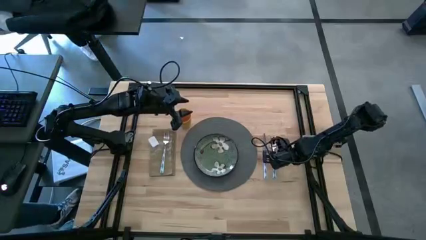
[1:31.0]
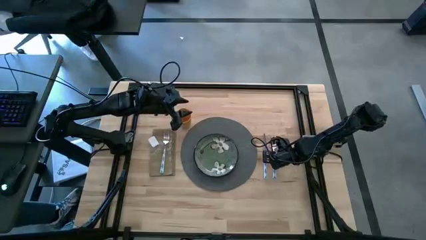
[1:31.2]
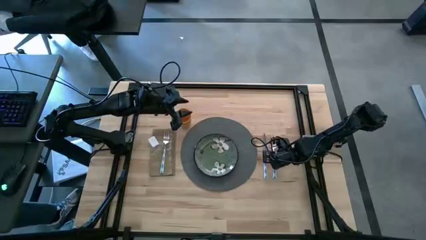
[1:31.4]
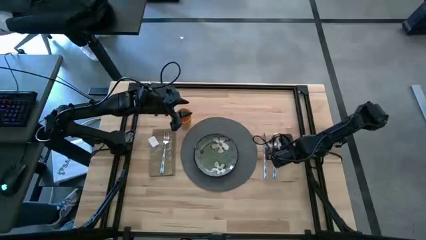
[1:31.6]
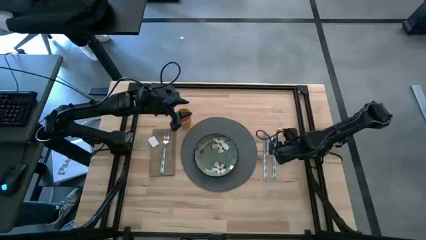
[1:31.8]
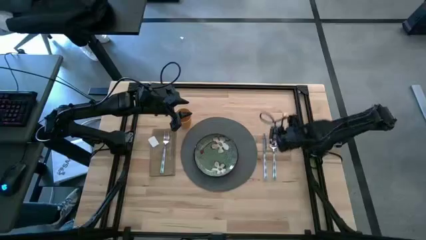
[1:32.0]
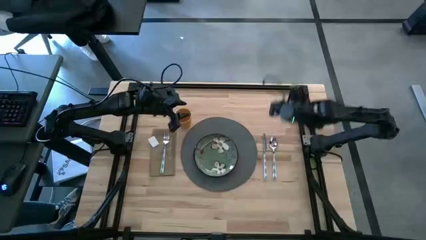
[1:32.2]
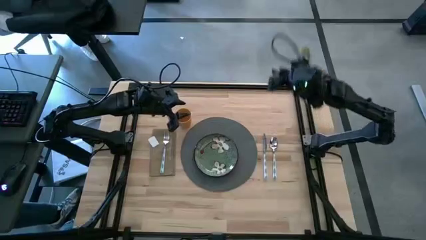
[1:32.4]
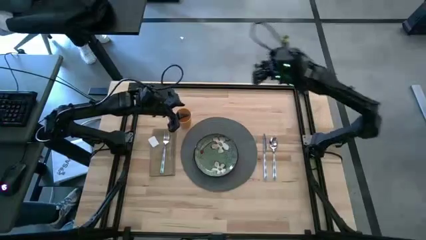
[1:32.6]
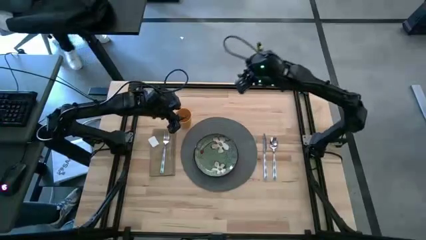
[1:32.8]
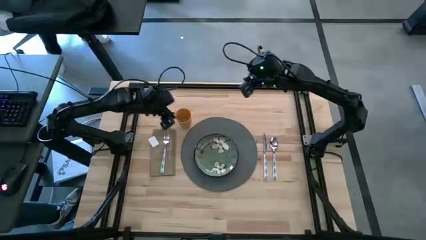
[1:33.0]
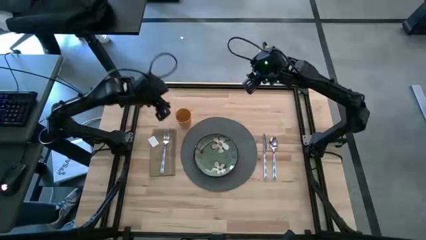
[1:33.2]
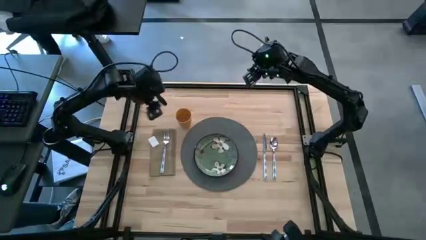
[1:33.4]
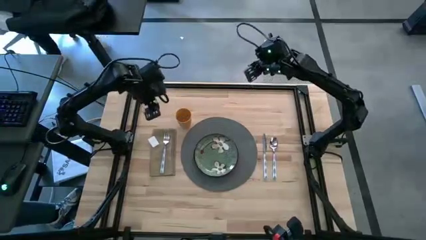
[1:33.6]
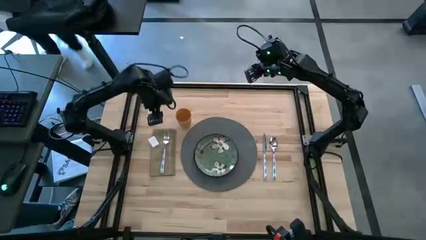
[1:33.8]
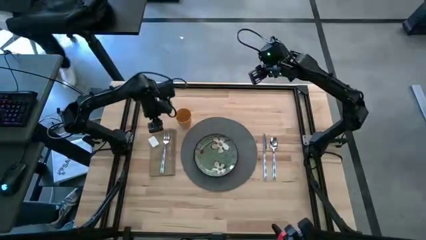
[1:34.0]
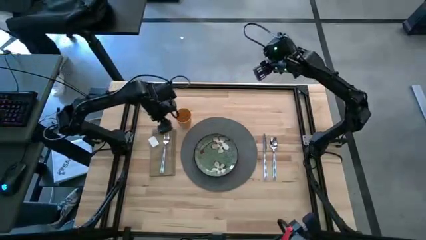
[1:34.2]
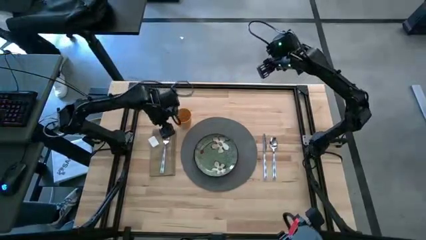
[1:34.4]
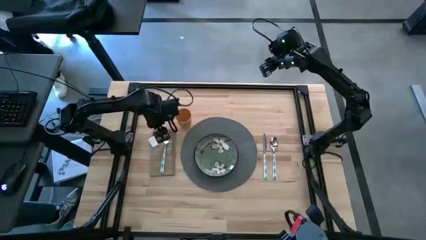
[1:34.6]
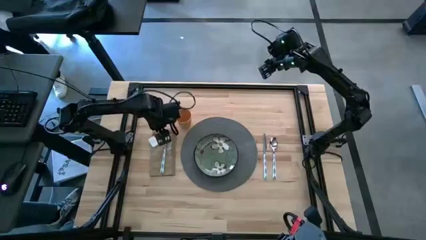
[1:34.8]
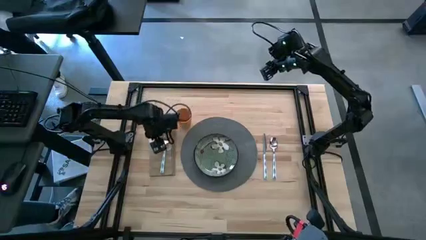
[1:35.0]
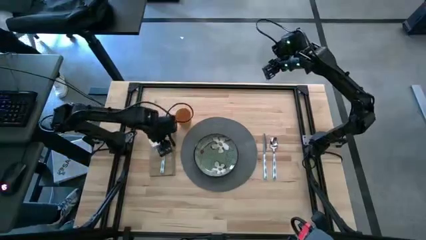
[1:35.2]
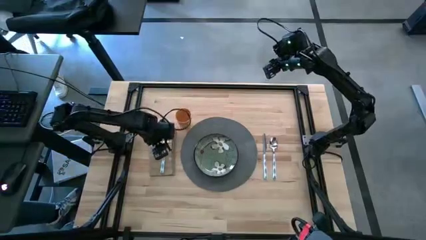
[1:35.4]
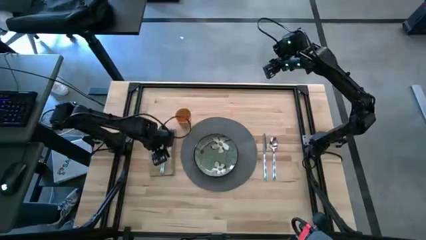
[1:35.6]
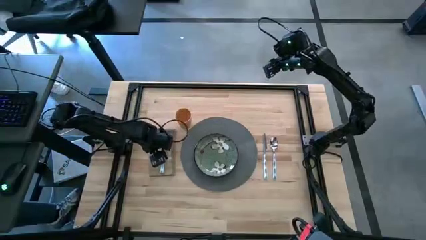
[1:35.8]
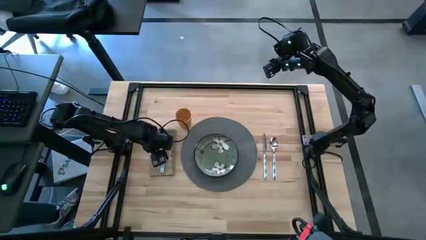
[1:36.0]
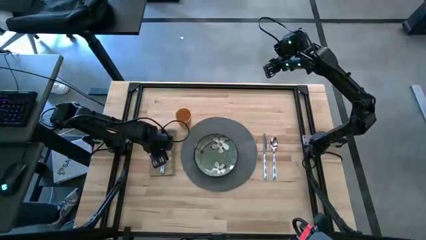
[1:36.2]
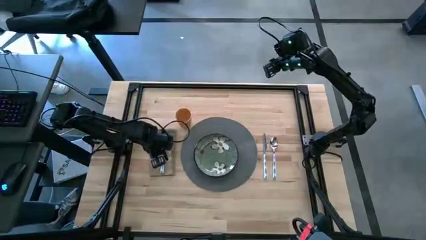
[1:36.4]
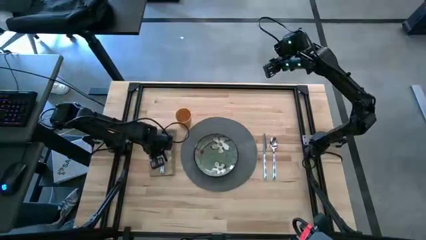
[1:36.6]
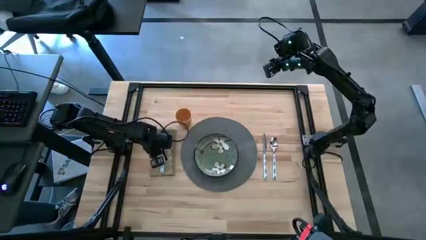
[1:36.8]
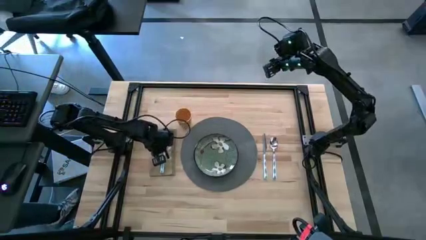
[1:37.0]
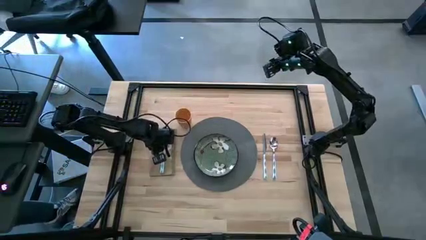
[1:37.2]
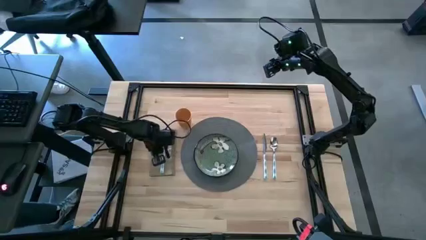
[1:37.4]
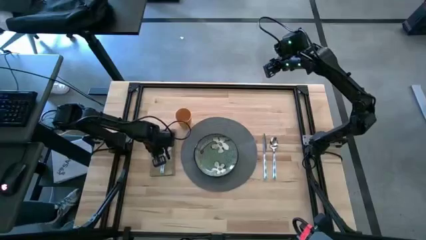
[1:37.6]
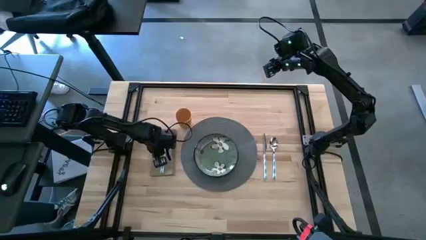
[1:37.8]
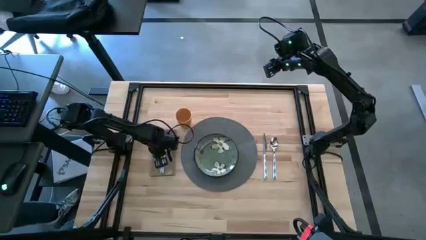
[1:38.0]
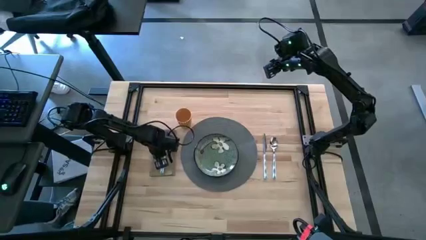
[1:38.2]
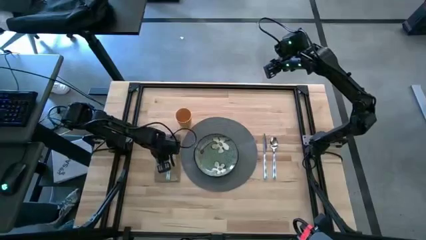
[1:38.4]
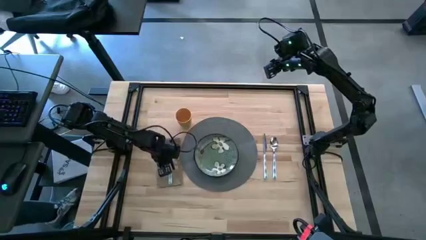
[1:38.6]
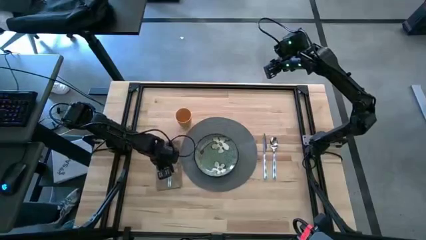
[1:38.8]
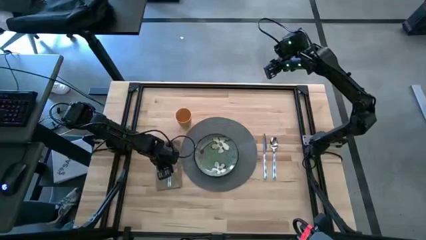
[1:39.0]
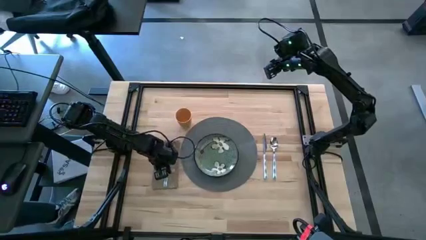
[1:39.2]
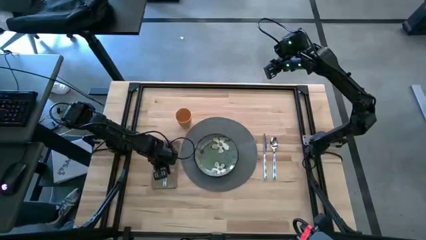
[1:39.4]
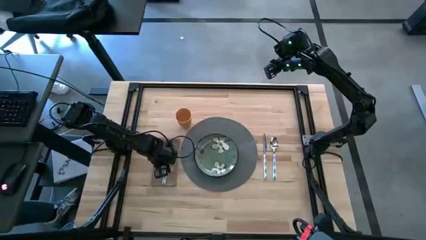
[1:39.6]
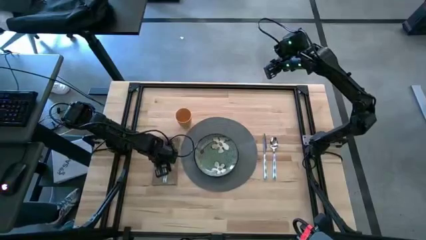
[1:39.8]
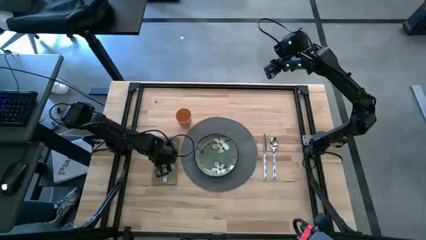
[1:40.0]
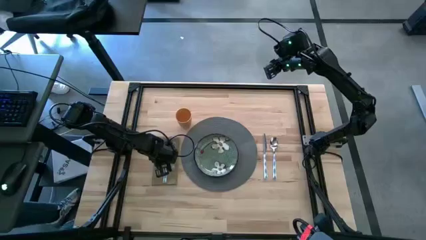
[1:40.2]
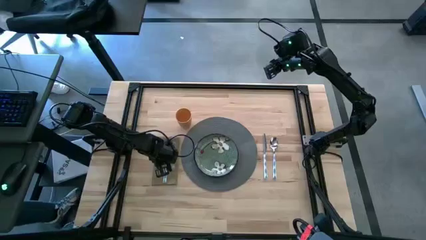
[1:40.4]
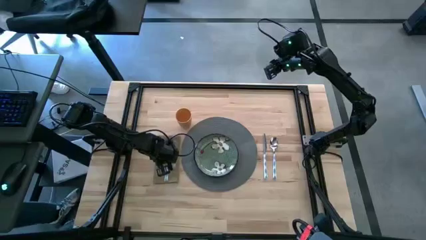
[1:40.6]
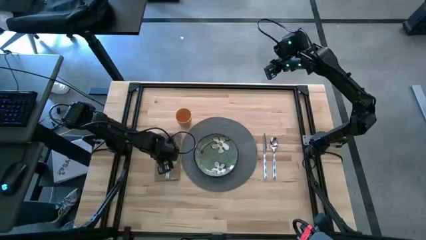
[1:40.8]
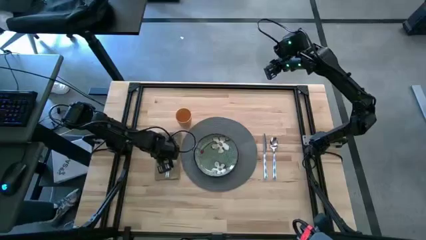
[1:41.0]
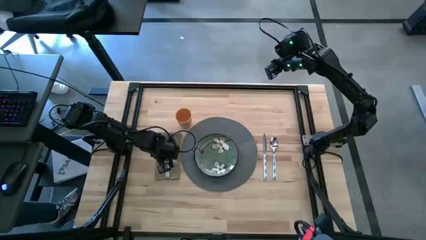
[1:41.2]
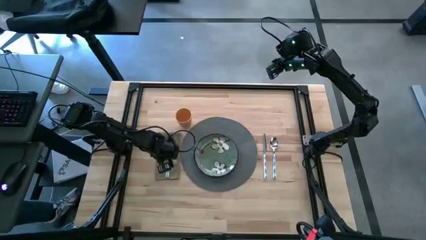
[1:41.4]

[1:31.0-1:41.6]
Task: Set table place
Adjust the brown table napkin

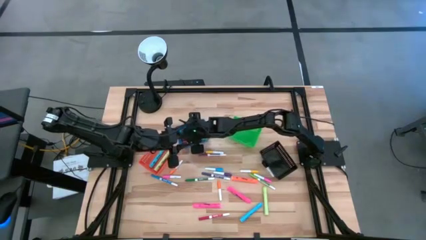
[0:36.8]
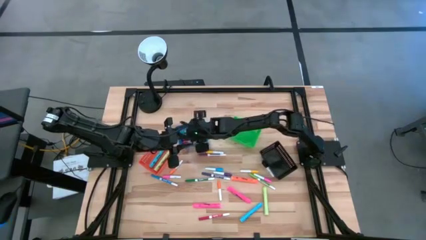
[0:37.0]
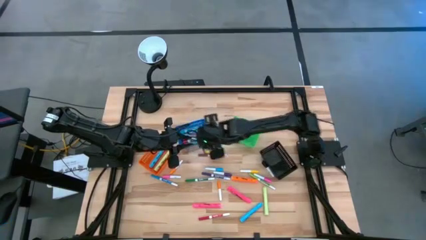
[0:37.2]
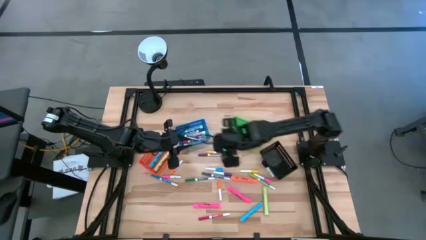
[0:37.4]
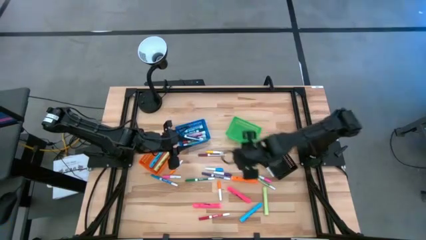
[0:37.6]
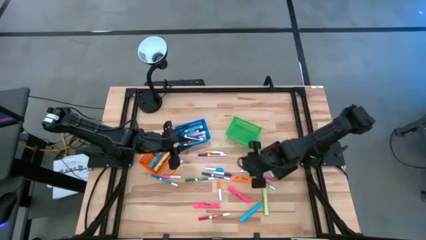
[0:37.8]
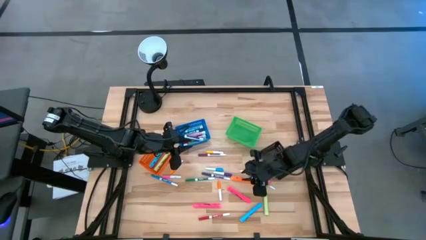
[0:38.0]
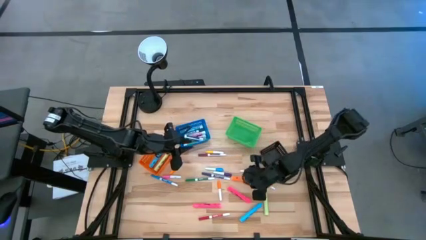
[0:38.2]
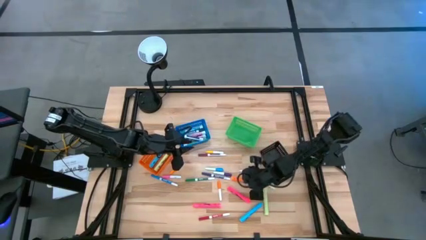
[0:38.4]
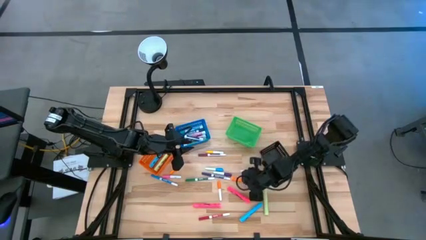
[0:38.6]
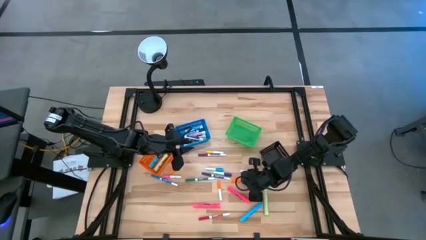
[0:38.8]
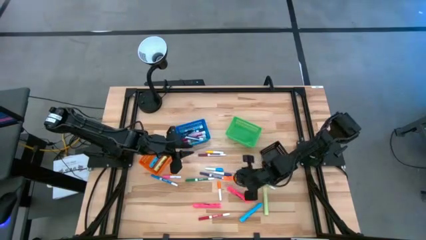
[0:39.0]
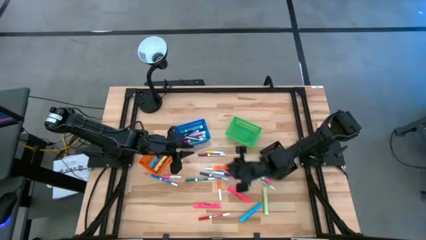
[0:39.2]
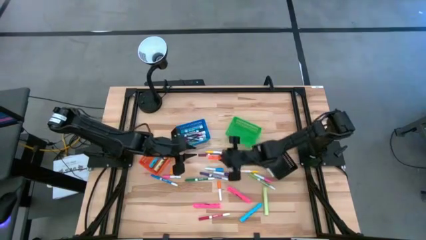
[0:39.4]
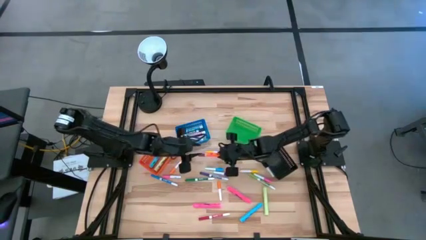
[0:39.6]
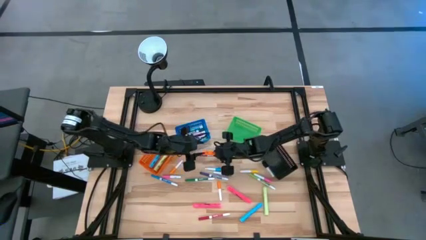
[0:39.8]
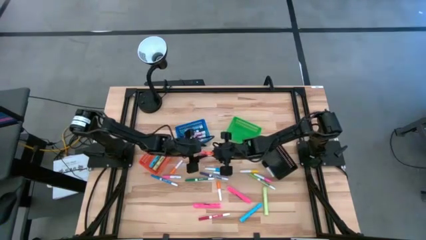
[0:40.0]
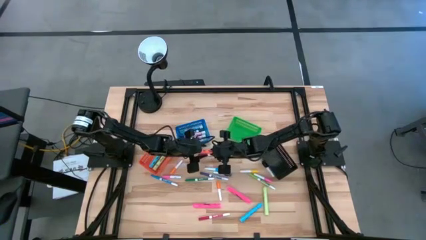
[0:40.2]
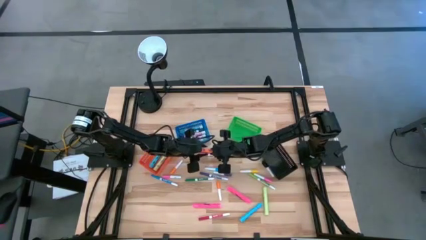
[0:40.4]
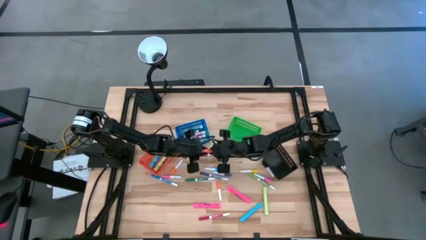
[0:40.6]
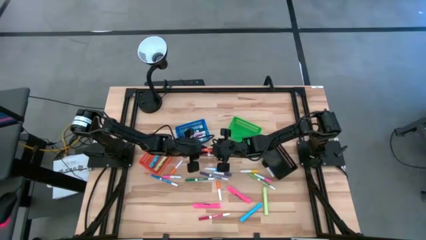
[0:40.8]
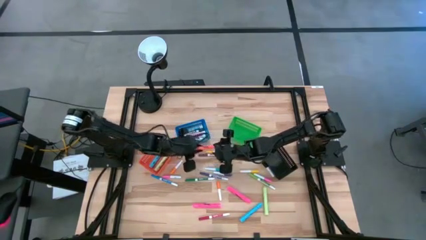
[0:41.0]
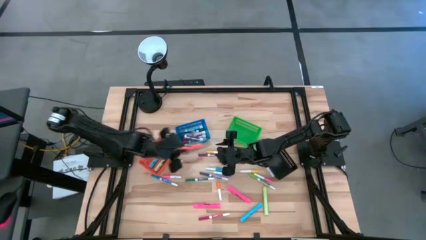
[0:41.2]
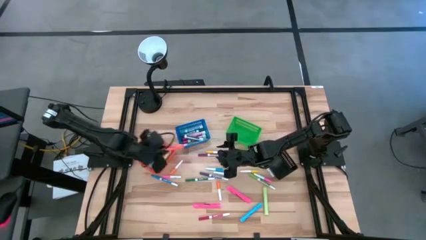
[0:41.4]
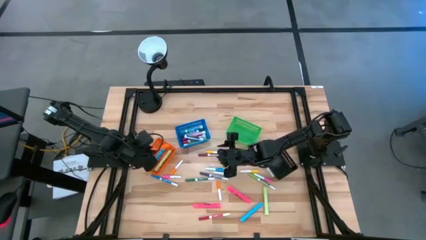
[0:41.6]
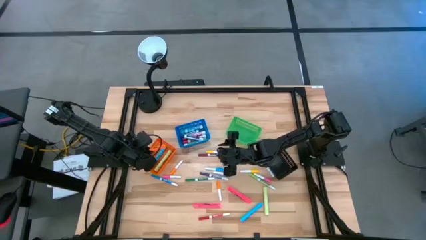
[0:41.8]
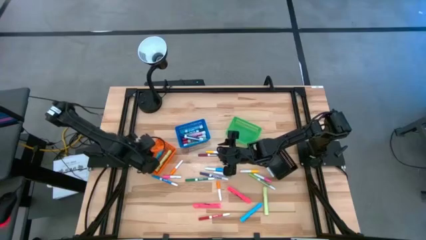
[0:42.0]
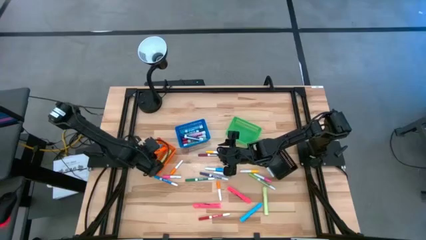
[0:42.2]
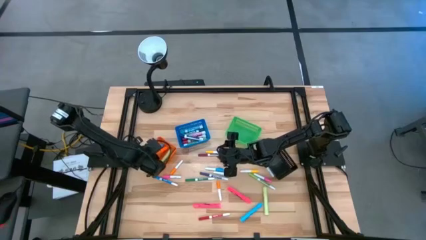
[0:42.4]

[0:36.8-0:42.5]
Task: Pick & Place Markers
Put the right orange highlighter pen into the orange basket
